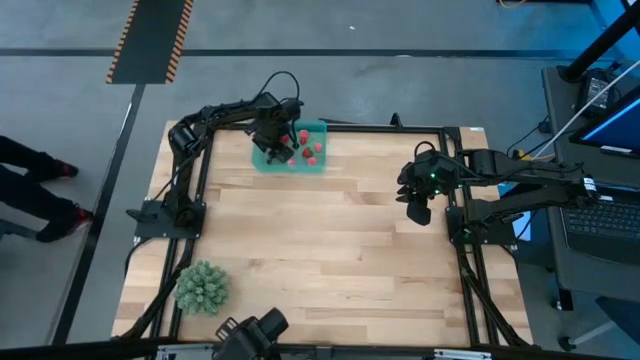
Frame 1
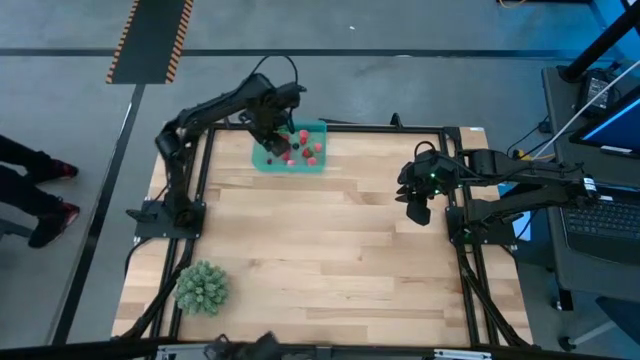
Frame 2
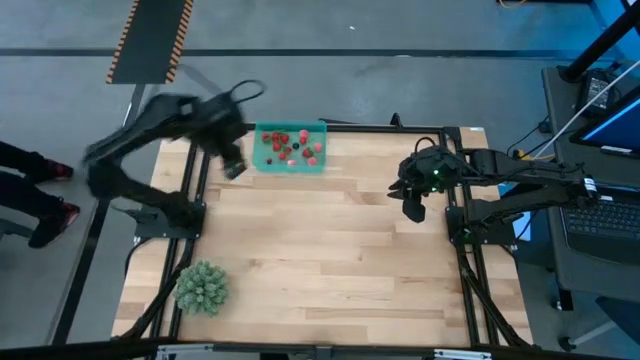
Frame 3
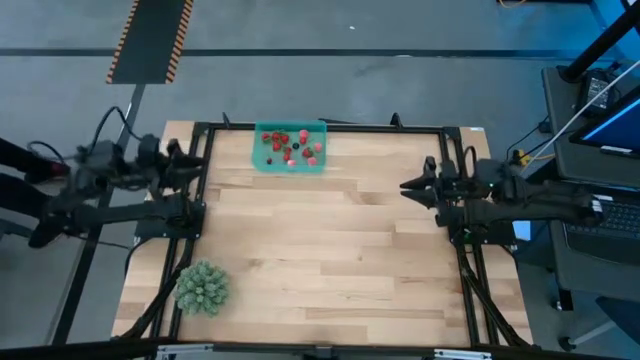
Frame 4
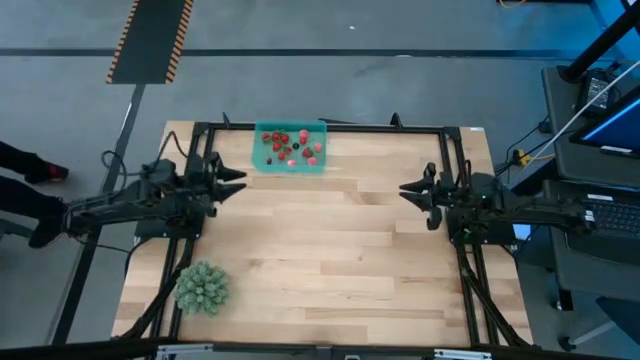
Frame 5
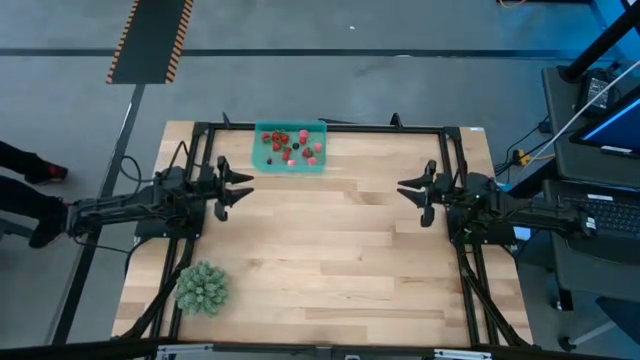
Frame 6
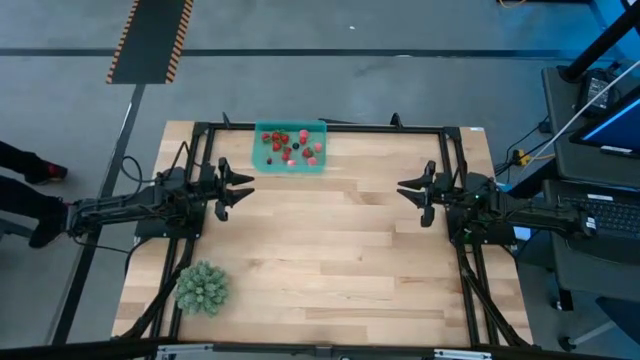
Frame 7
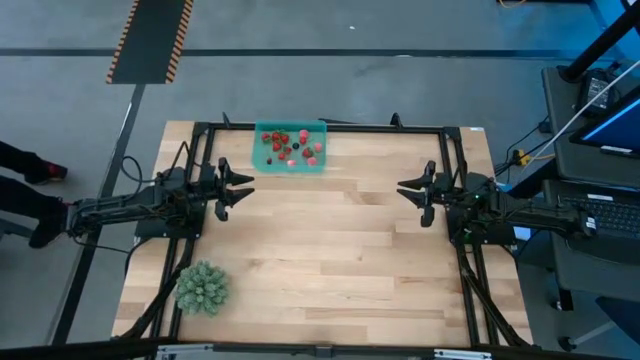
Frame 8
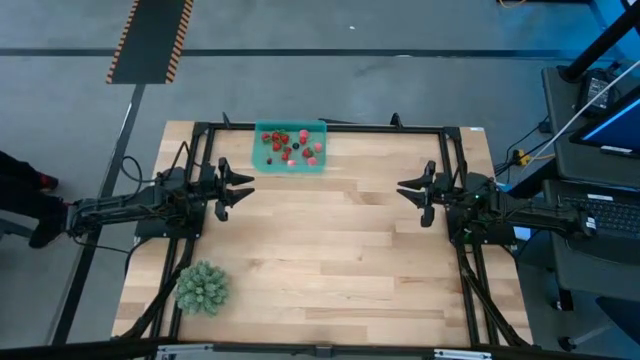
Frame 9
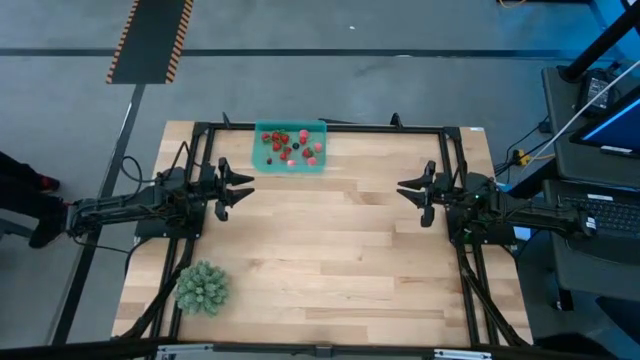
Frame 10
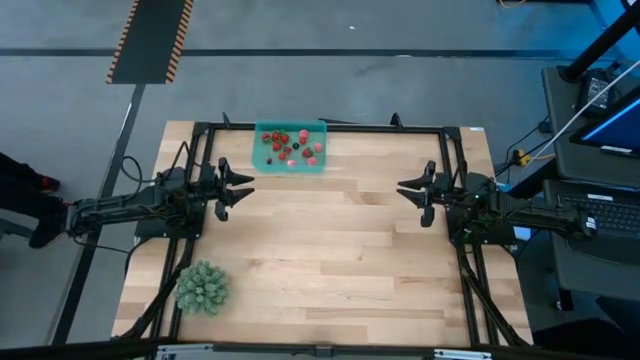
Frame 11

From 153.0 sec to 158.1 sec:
Task: Pick and placing Produce into tupperware
Return to Home Position

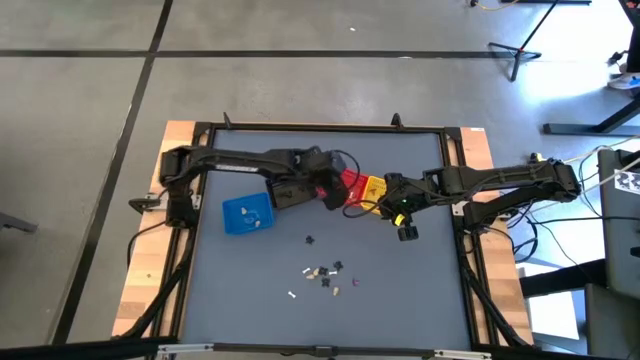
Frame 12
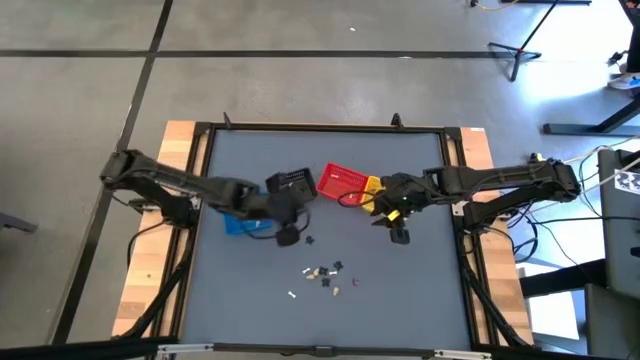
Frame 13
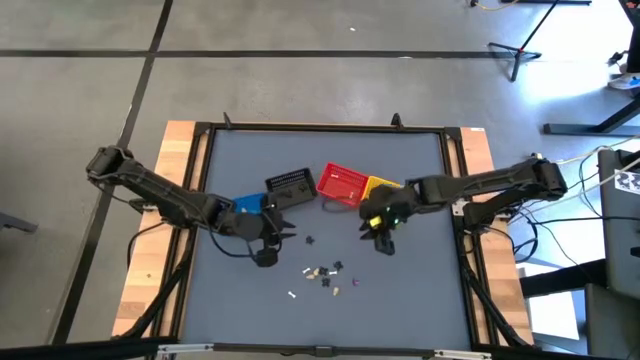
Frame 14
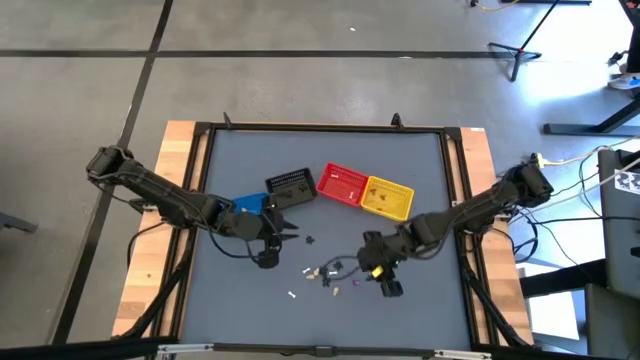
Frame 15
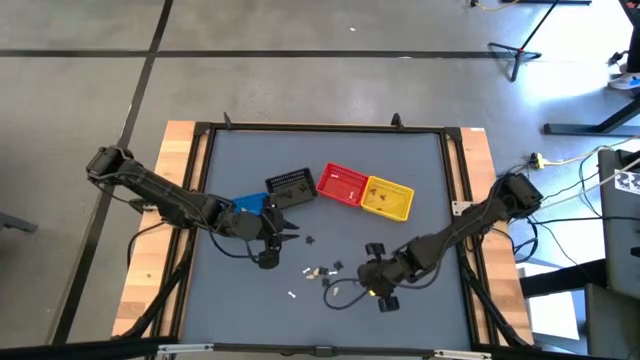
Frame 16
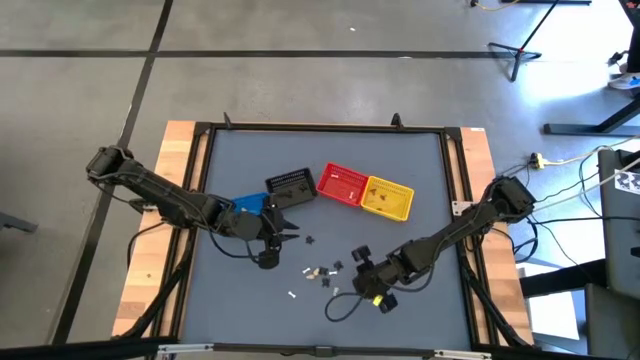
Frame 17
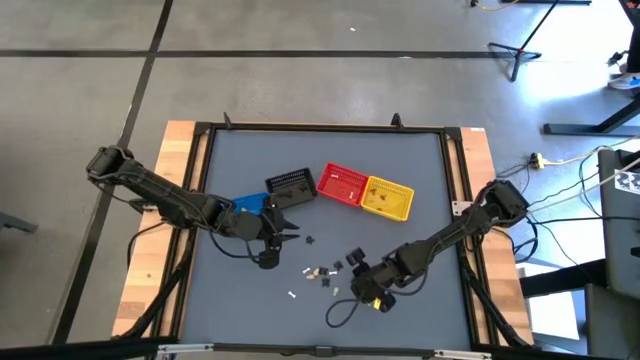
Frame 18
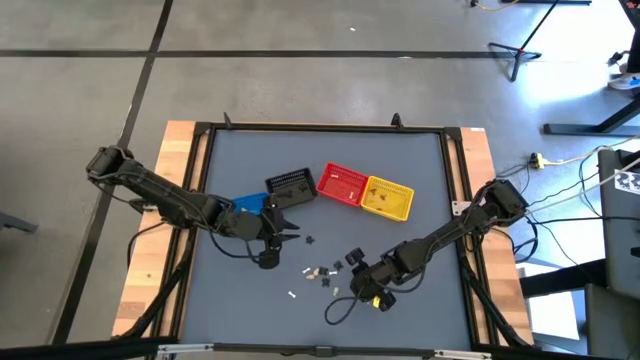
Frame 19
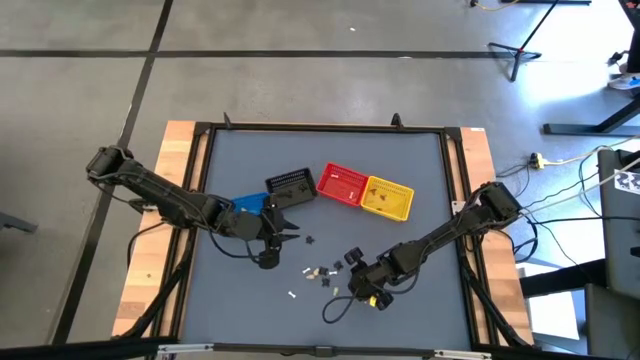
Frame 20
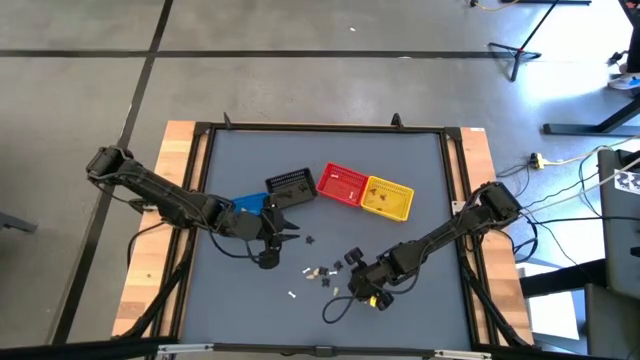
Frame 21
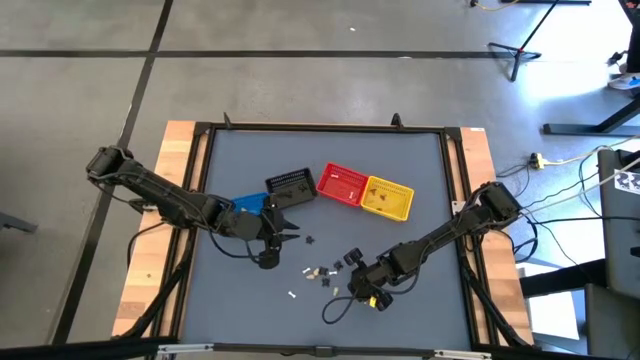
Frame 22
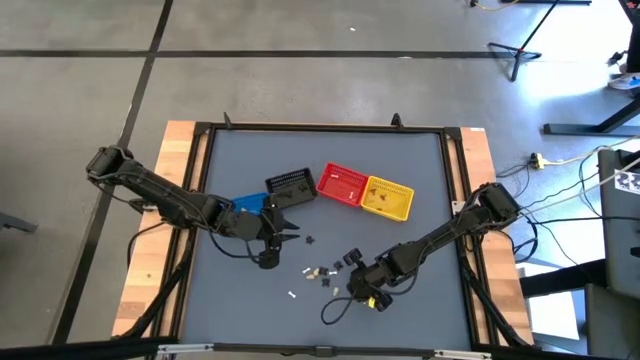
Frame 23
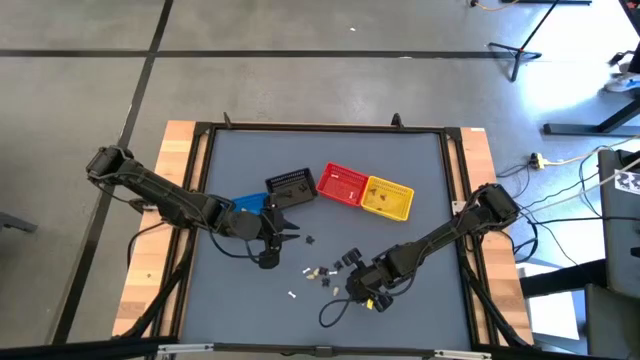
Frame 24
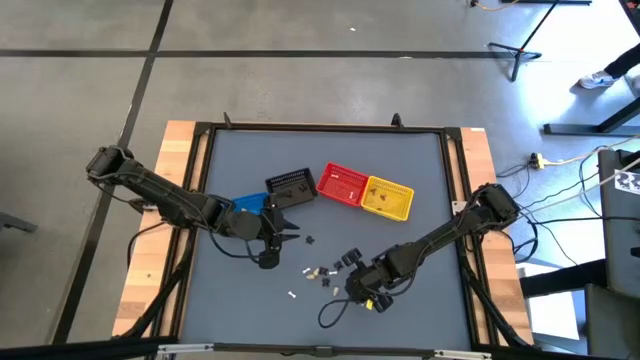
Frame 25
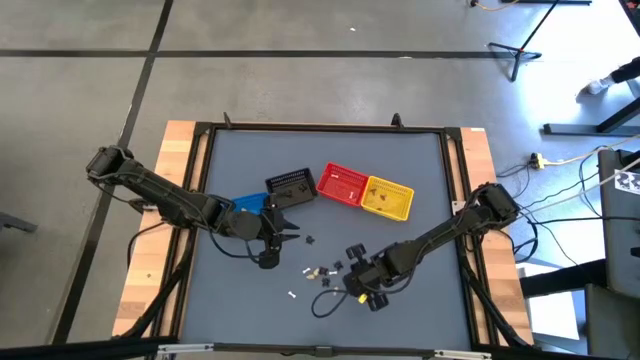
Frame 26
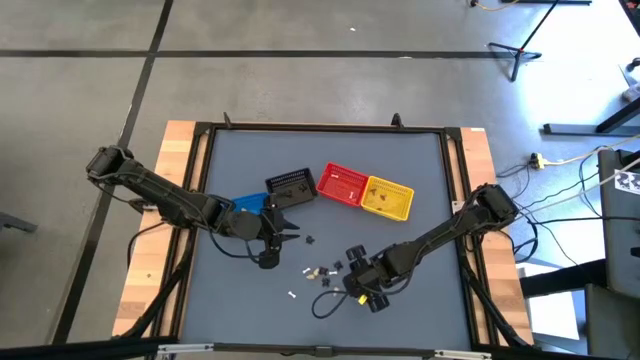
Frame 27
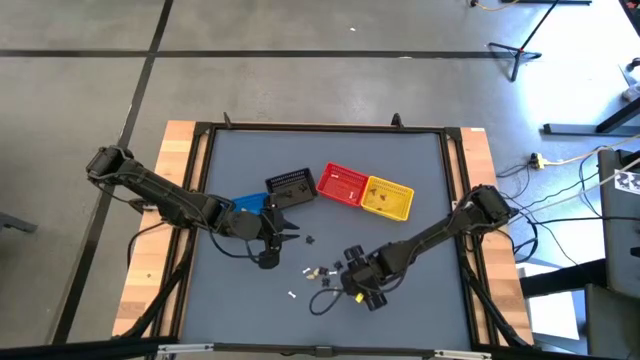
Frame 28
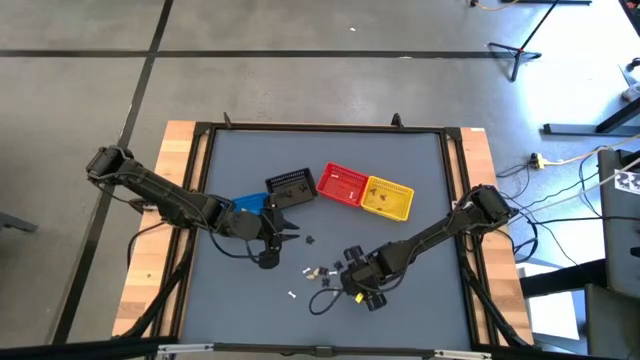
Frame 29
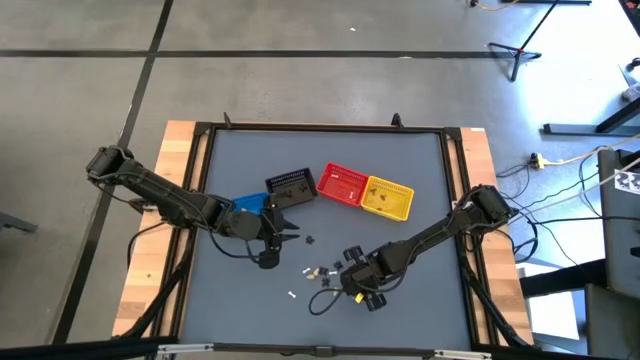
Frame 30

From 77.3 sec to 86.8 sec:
Task: Sort Halloween decoration
Put the purple witch hat toy into the yellow bin

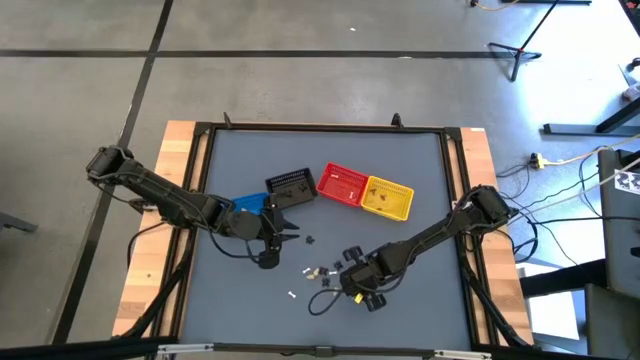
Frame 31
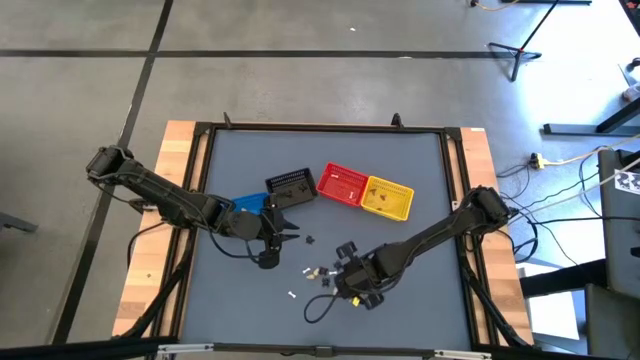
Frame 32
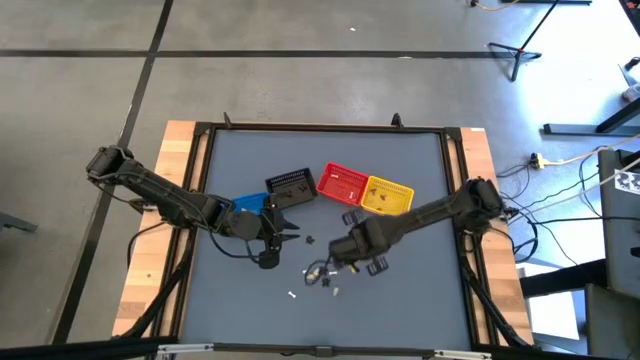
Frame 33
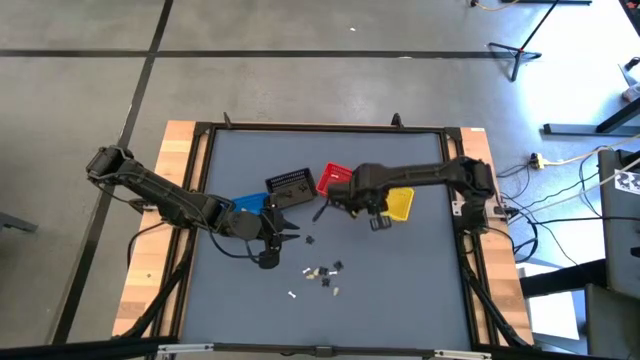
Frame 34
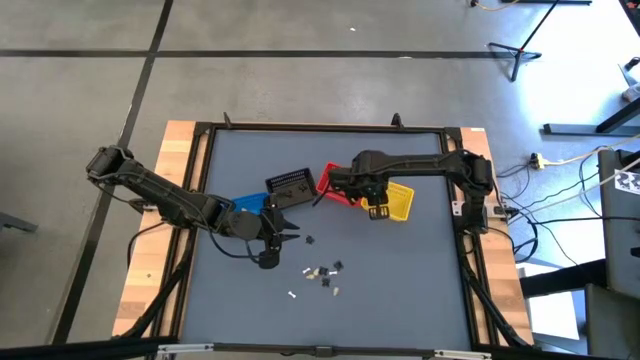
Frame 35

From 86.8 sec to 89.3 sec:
Put the purple witch hat toy into the yellow bin

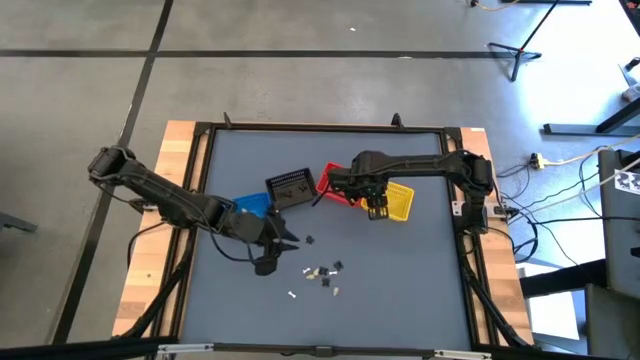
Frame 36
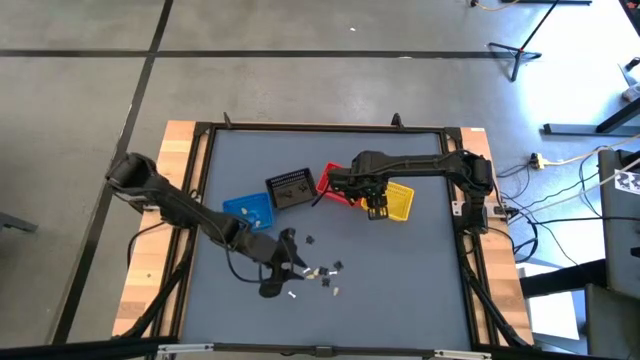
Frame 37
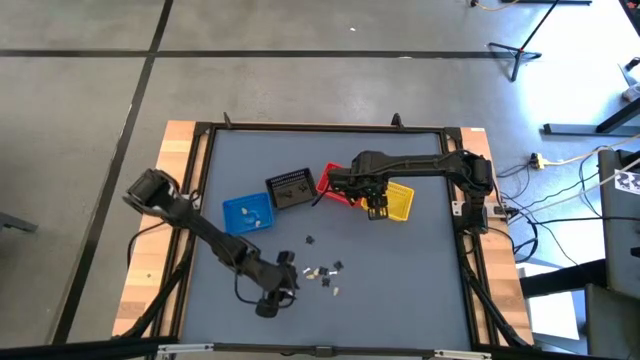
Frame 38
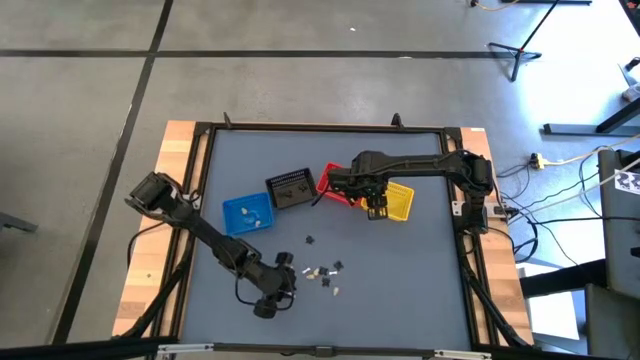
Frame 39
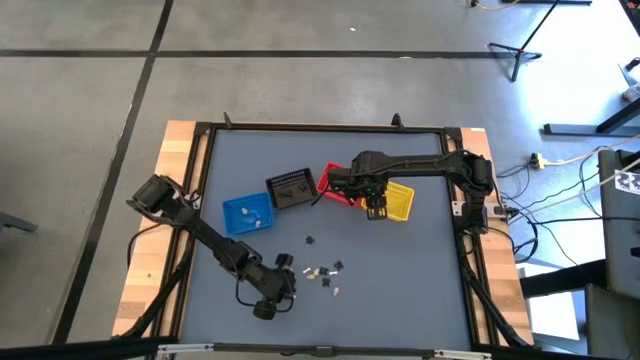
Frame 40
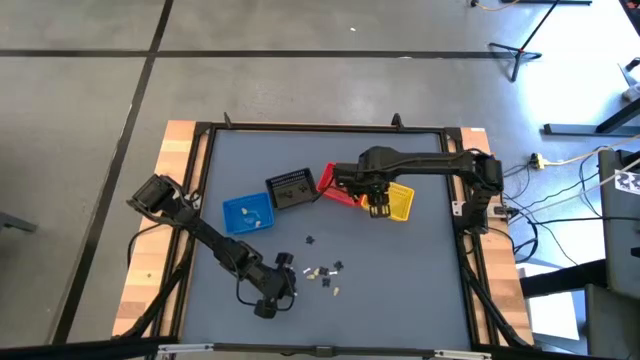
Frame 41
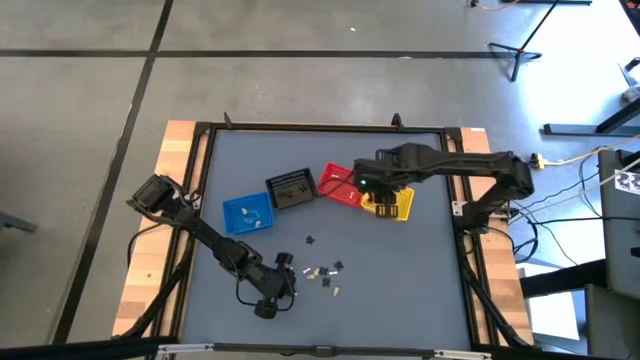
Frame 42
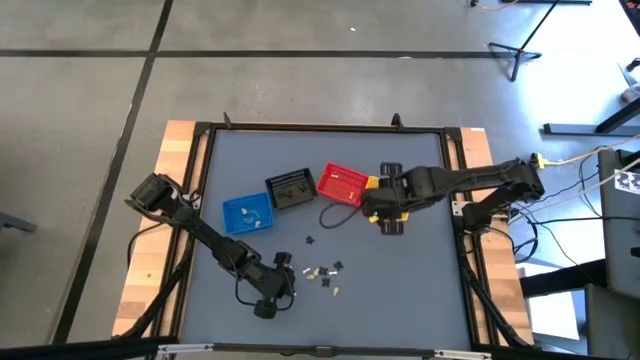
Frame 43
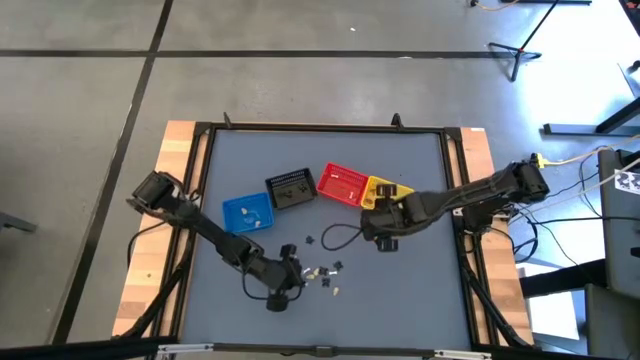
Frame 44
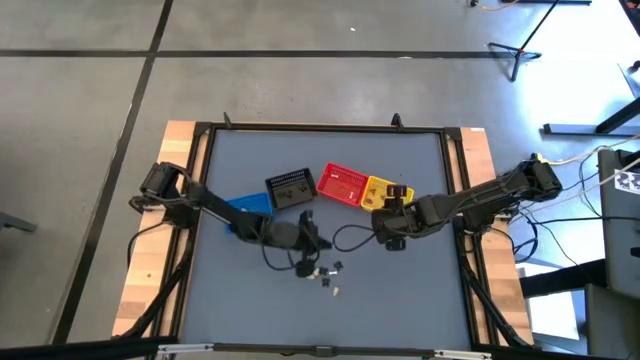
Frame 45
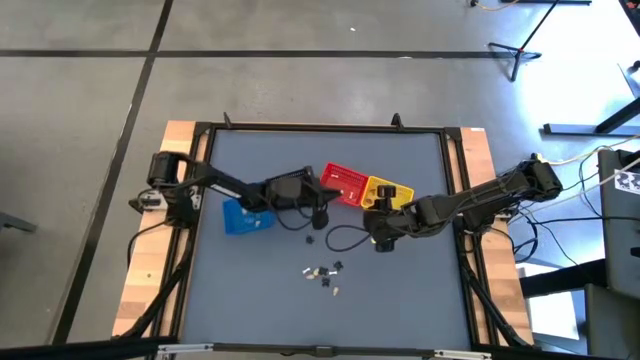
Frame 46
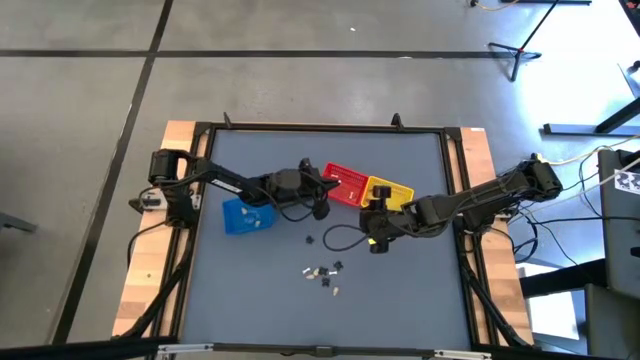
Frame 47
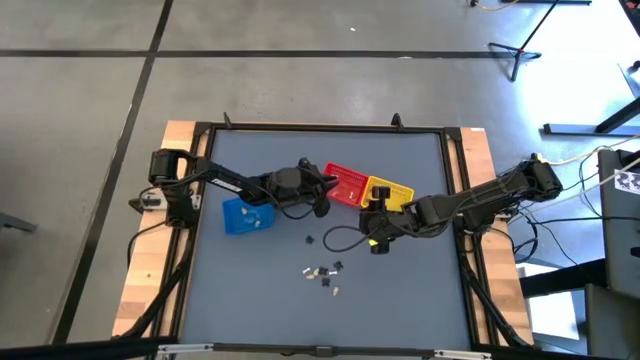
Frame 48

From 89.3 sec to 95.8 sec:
Put the white bone toy into the red bin
